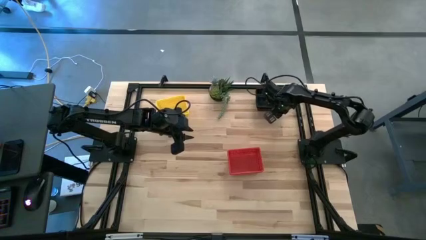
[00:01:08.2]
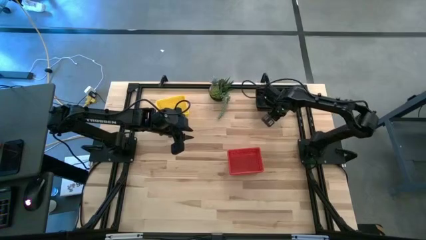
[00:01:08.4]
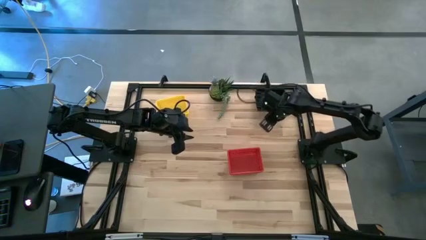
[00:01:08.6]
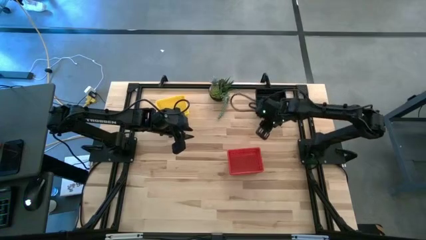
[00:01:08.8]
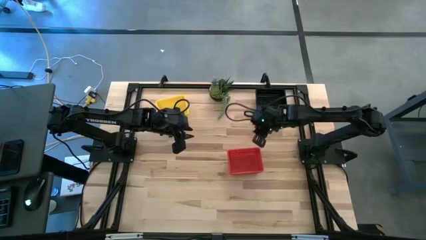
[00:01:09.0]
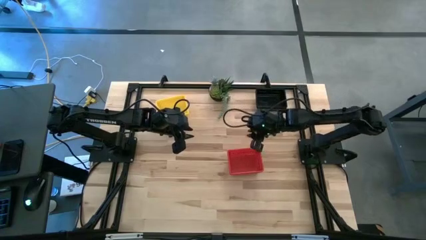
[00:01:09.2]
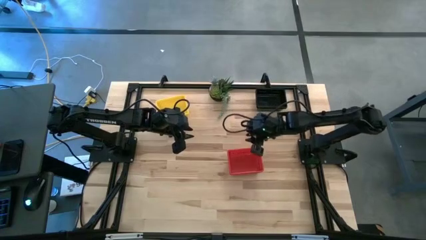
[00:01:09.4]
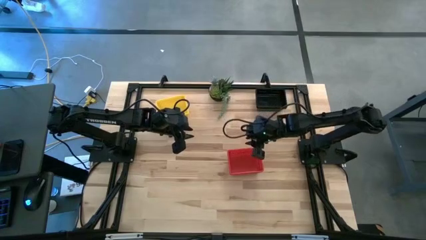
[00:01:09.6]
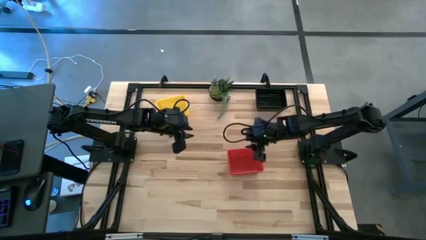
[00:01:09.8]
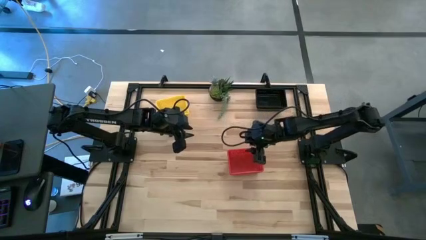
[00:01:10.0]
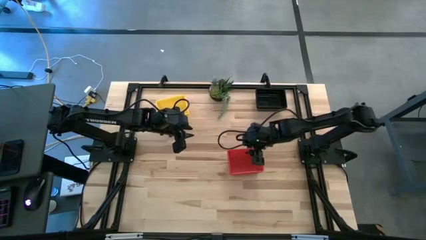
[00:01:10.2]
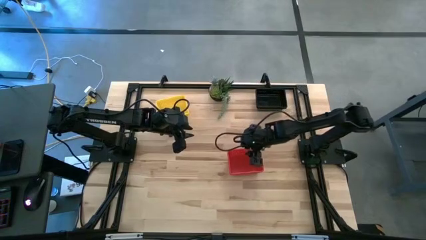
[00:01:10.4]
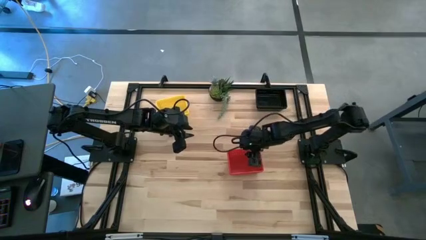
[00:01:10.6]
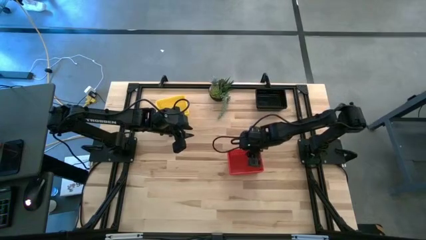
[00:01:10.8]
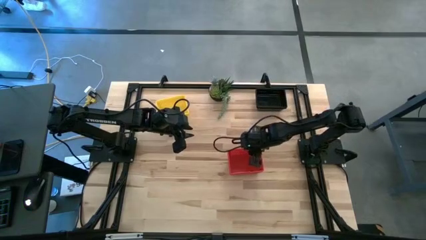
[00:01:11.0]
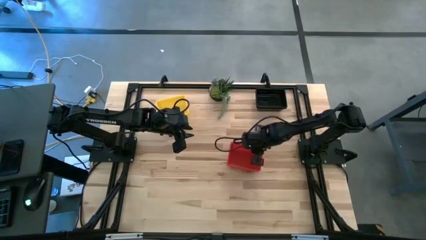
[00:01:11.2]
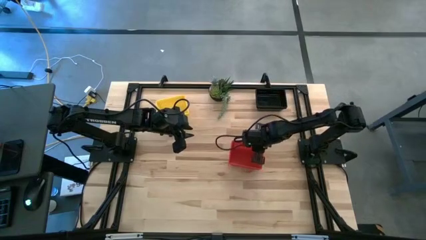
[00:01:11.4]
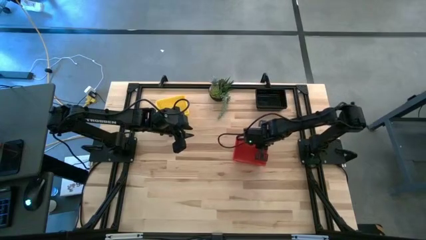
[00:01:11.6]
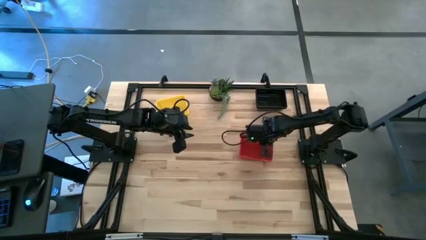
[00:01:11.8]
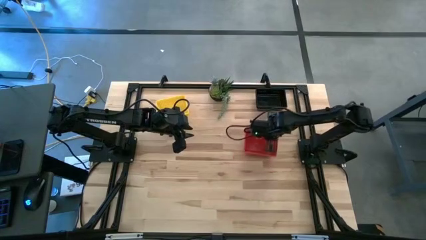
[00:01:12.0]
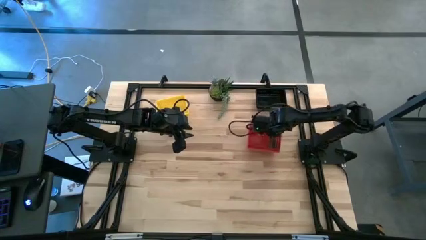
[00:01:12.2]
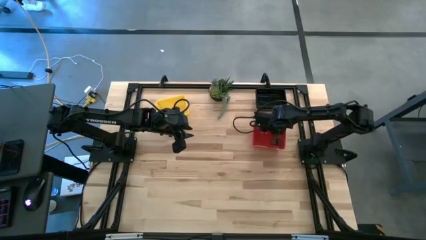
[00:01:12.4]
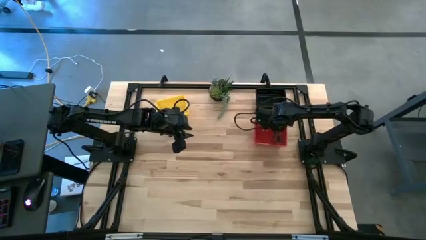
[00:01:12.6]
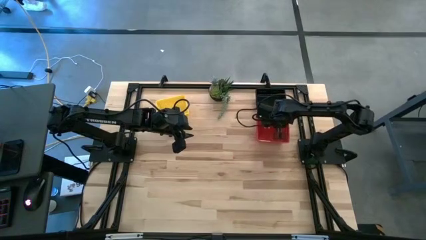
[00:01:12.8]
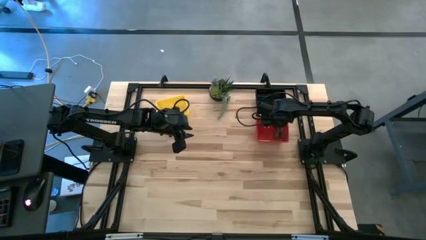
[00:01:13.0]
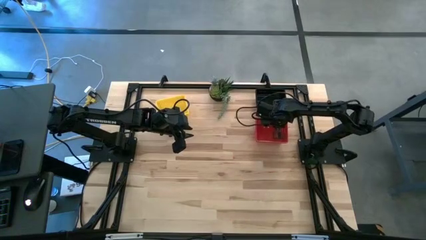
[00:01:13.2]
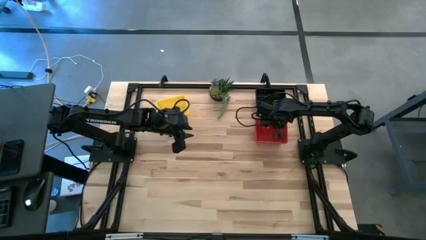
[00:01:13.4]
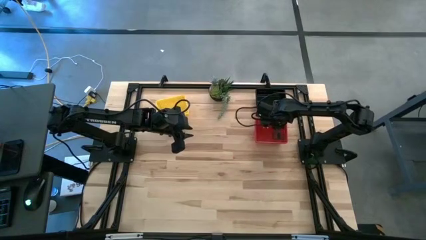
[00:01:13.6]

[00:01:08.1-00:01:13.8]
Move the stacked red bins to the top right of the table

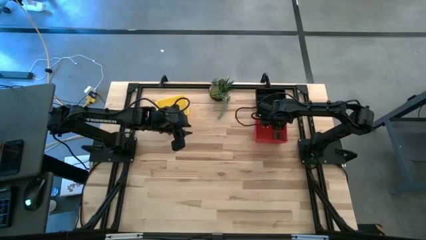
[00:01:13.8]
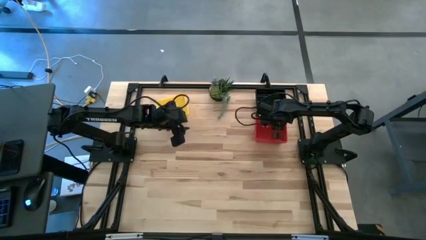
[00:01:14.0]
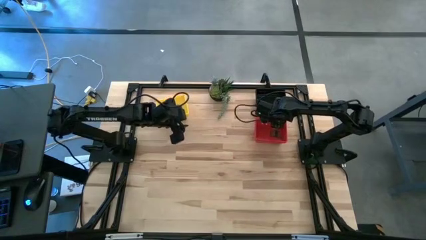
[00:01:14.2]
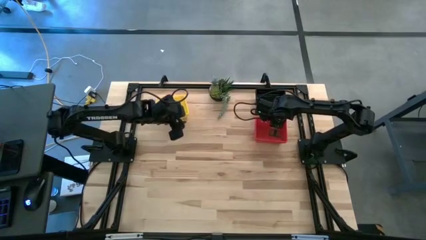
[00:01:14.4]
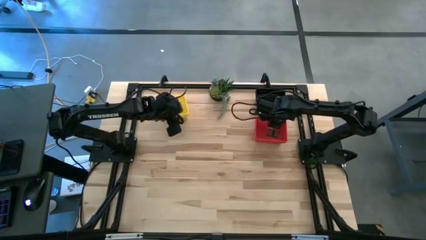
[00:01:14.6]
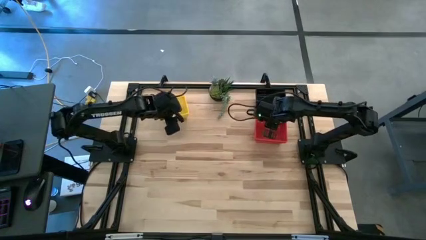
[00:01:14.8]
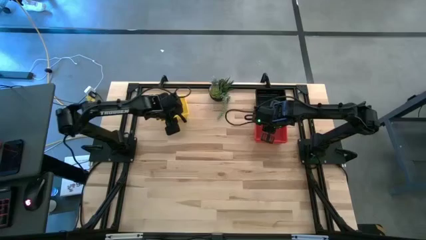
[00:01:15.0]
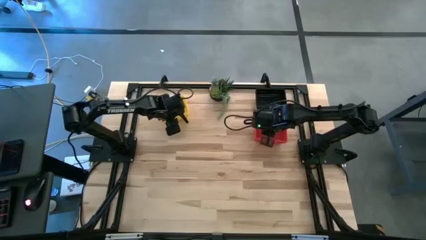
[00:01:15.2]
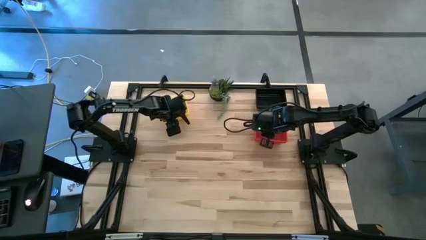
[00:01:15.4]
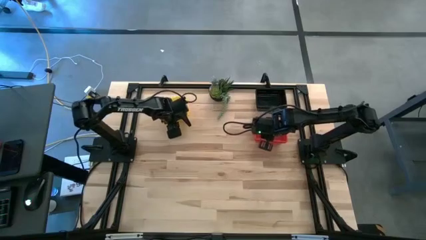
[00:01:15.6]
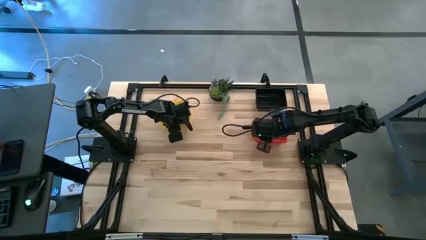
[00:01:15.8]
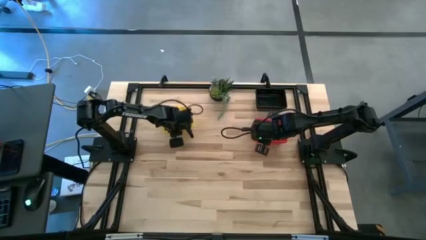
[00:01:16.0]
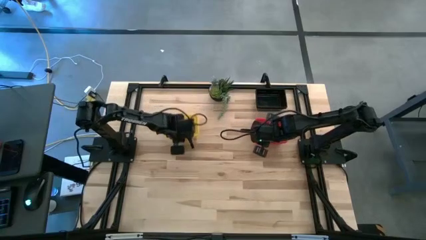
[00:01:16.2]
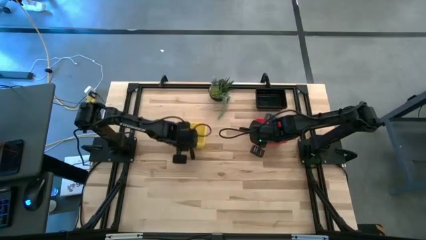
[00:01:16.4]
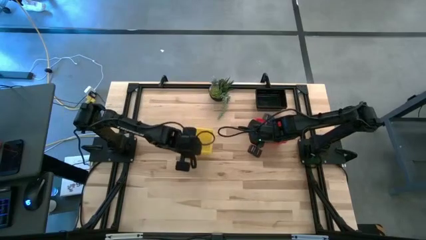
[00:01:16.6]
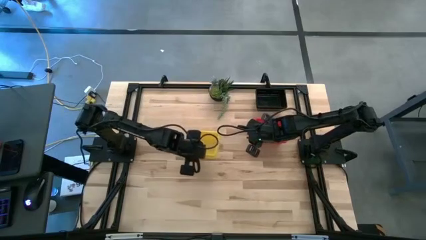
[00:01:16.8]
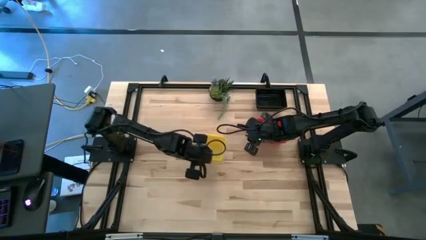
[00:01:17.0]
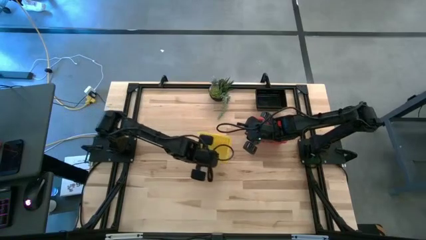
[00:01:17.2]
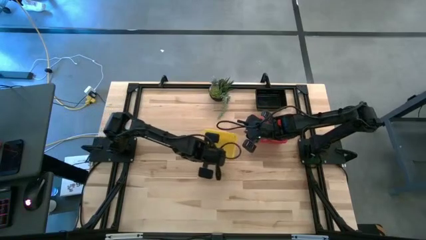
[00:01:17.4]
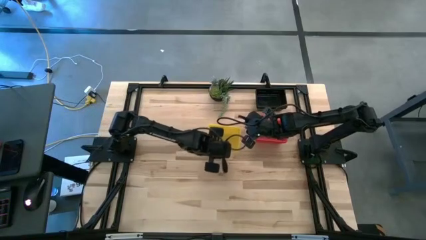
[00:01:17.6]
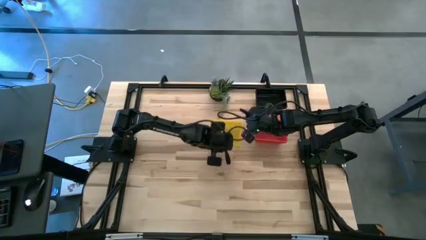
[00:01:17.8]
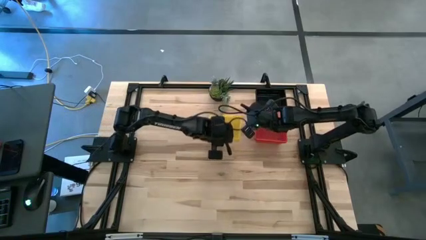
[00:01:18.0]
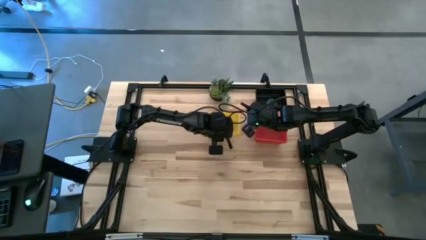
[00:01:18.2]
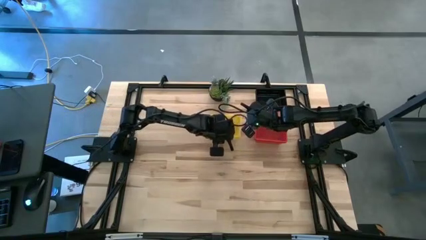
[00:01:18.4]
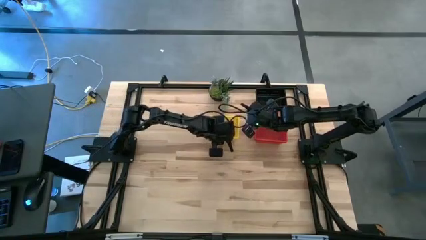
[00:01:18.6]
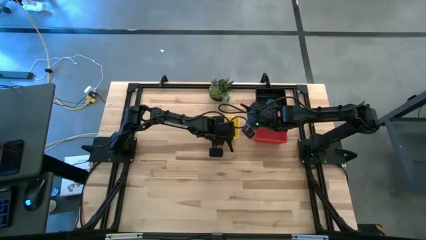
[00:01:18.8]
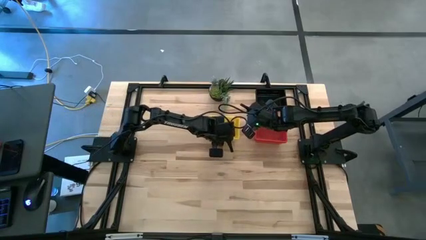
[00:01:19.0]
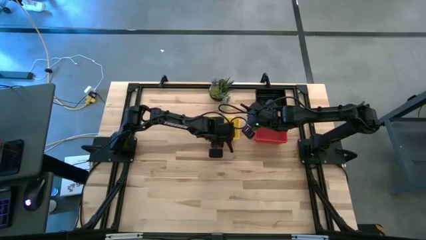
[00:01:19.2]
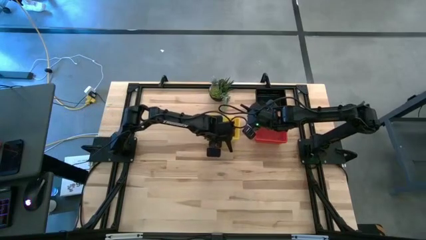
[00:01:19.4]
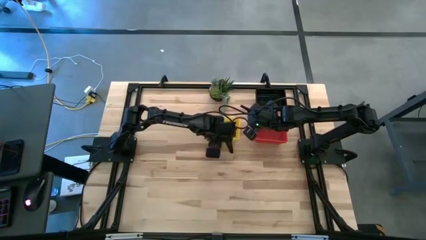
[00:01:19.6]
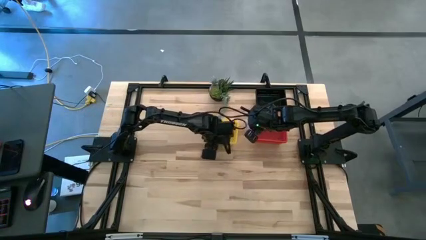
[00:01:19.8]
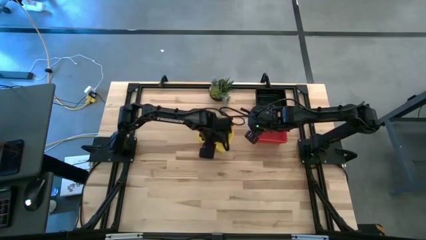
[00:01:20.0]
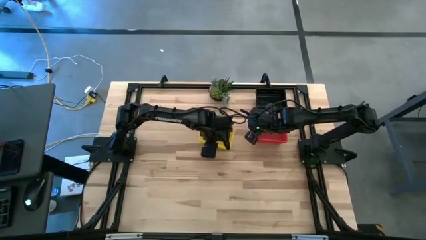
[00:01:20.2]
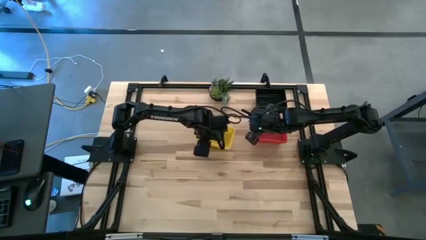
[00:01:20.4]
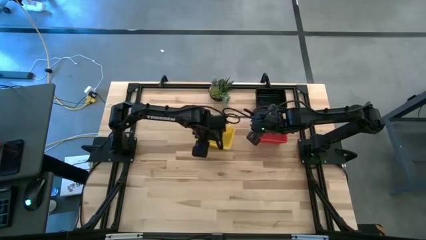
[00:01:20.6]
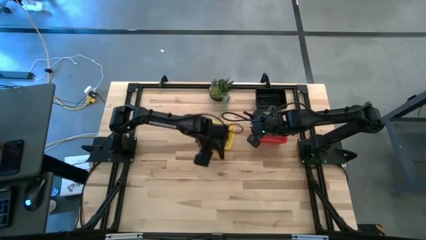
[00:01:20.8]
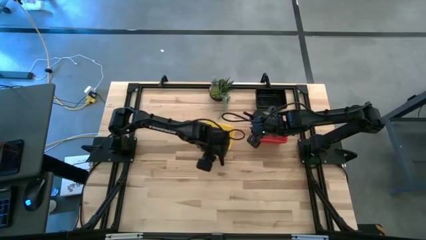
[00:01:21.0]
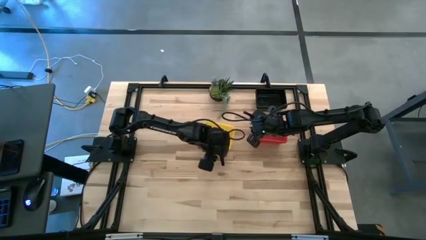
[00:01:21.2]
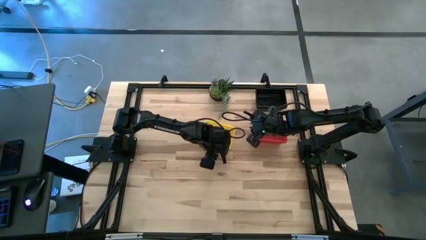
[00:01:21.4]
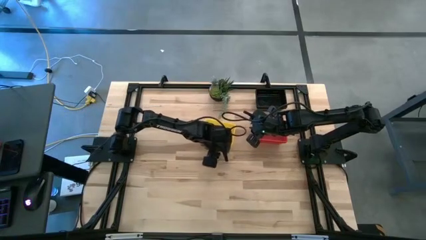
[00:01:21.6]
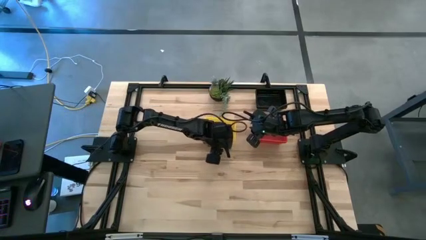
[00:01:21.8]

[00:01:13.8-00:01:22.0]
Move the stacked yellow bins to the top middle of the table
